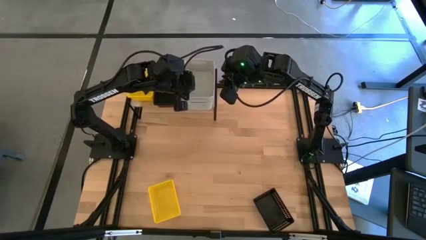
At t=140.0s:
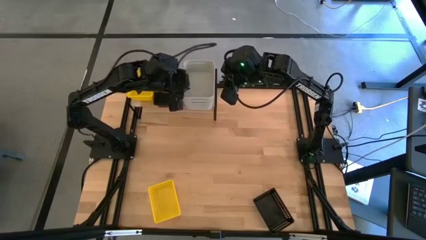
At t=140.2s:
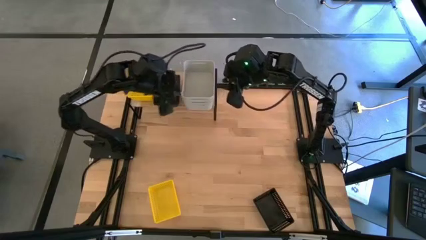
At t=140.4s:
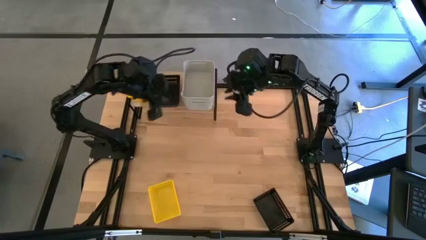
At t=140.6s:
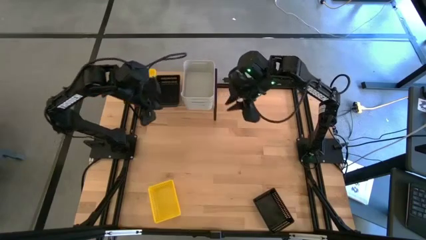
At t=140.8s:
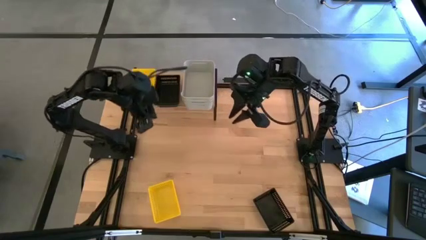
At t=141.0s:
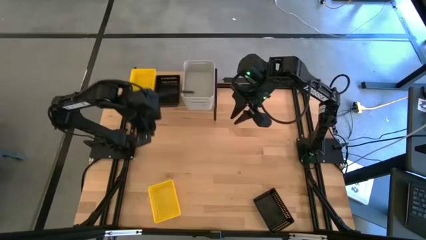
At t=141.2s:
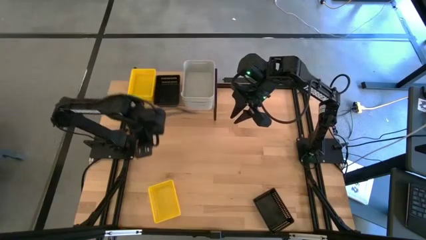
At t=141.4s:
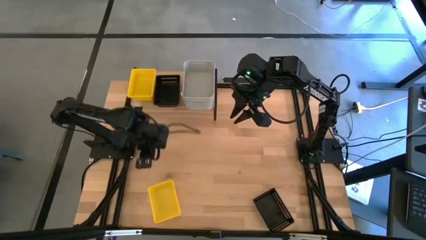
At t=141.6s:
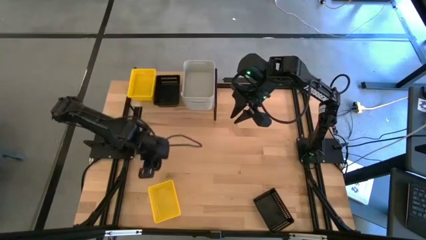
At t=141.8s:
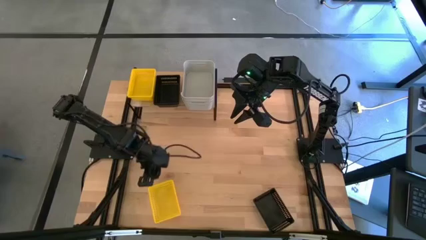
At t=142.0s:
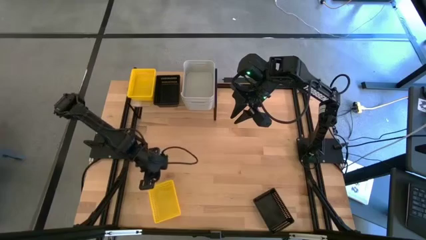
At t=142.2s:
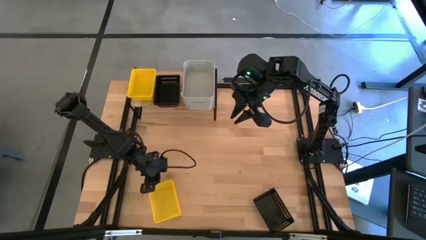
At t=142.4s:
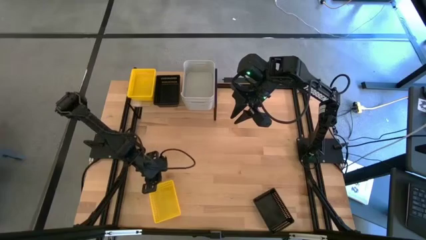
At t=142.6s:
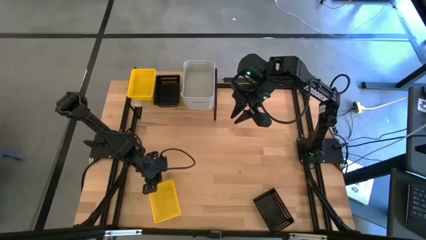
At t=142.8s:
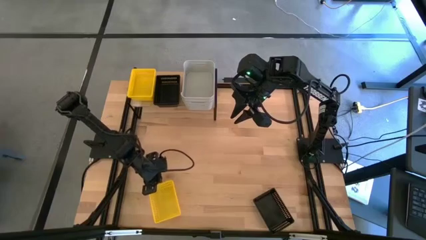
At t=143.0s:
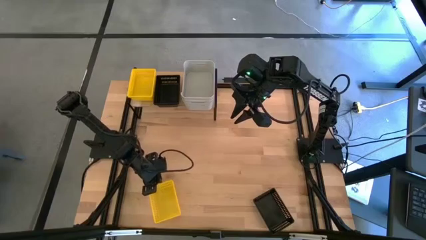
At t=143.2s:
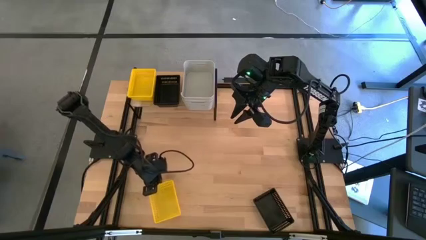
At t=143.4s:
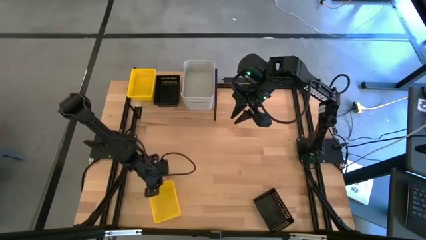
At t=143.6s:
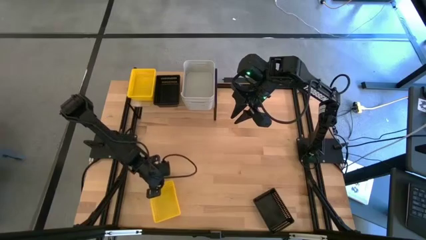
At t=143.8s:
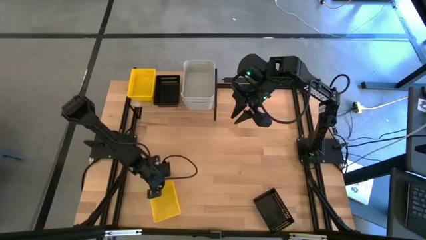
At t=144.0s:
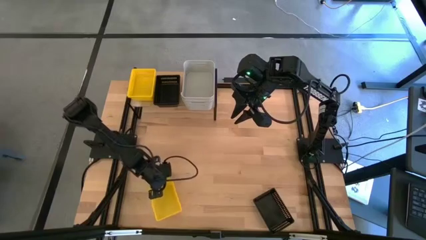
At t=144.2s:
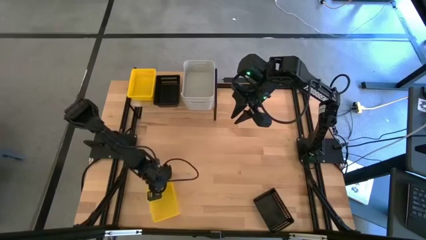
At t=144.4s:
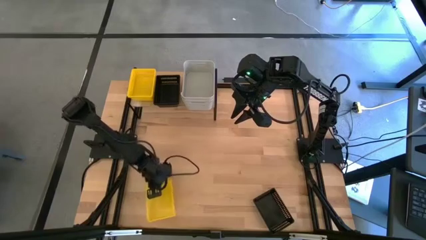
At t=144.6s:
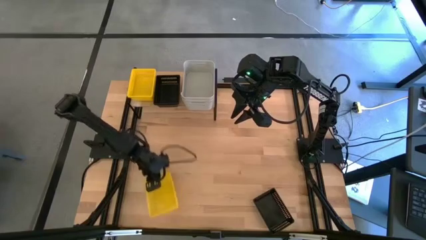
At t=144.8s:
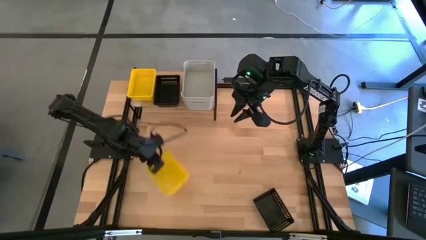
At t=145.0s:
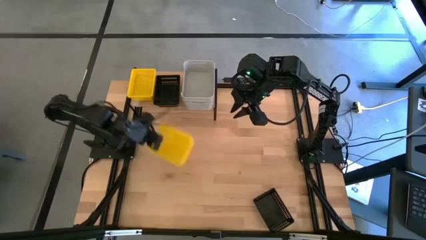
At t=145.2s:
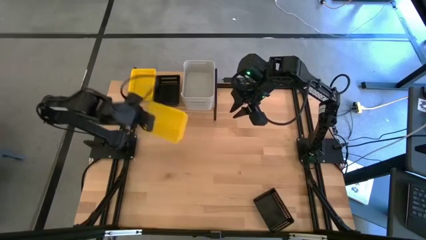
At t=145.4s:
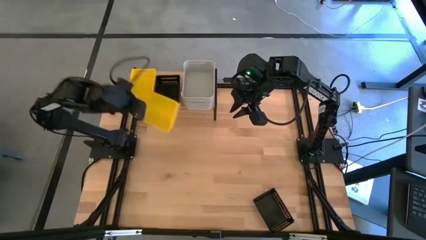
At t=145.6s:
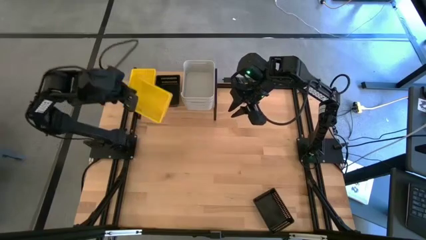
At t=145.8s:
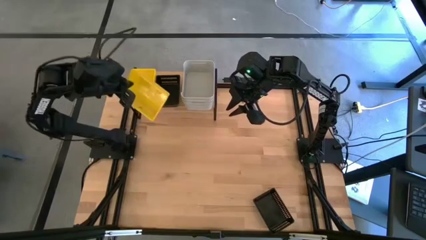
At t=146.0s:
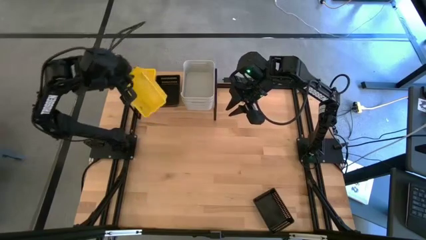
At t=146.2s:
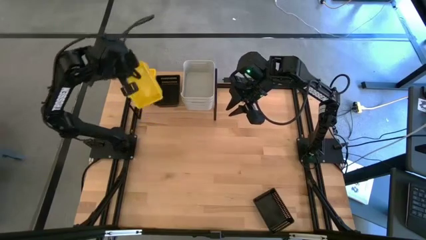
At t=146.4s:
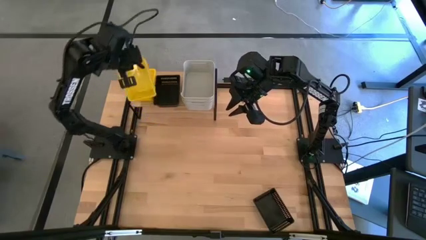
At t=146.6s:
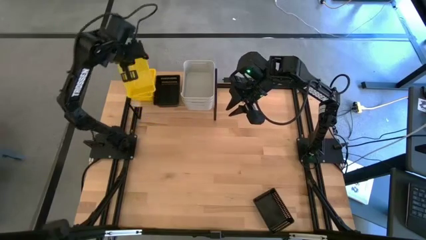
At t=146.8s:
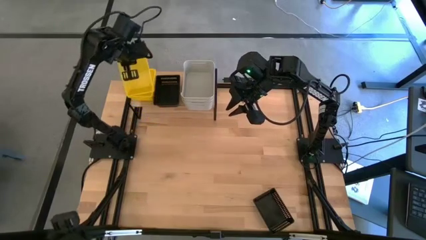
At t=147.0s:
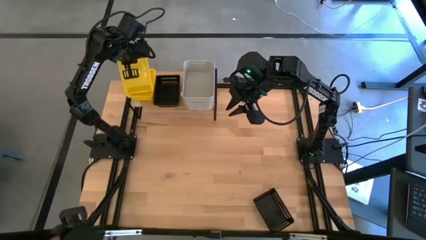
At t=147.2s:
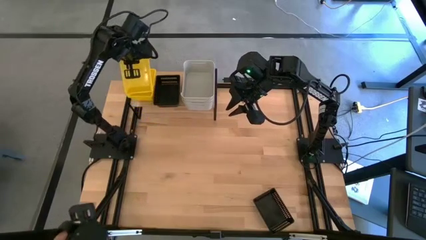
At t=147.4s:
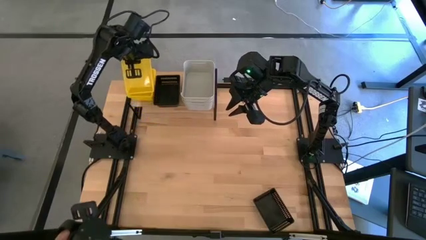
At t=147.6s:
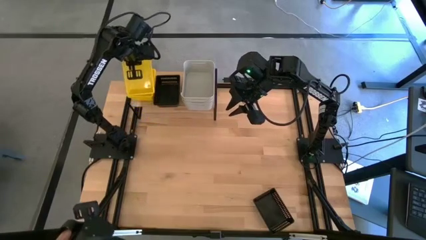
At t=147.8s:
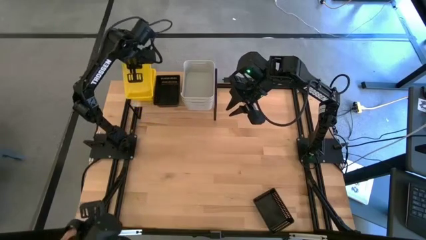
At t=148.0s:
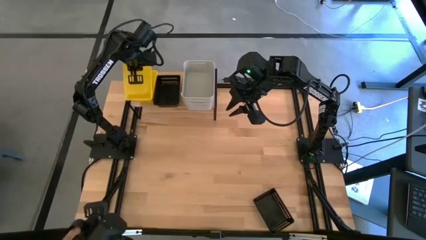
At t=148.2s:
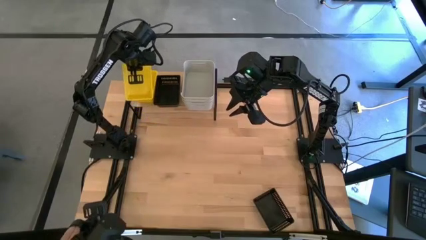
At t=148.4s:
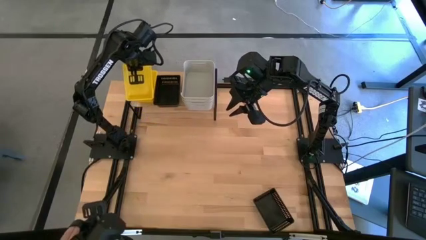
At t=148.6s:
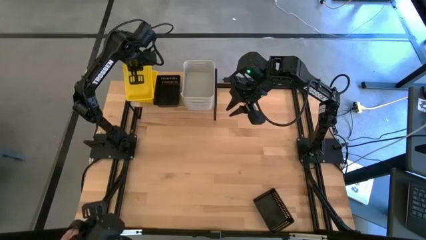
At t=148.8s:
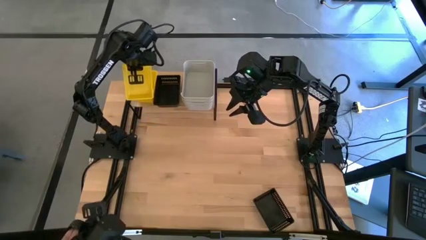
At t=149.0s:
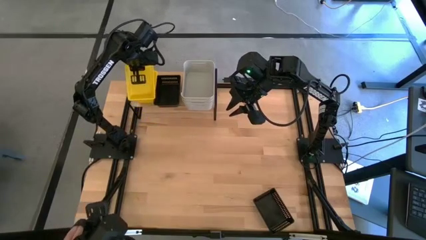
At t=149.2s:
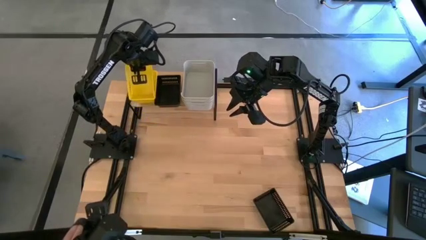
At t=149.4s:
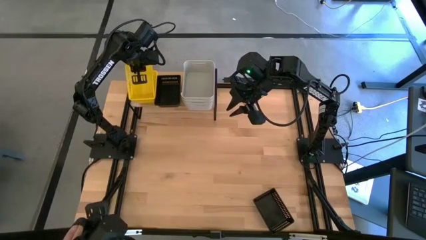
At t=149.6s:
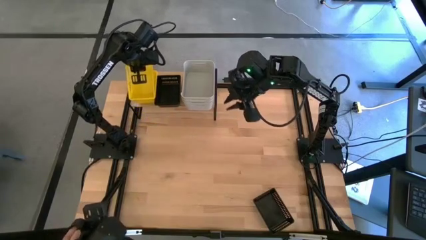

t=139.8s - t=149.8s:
Task: Stack baskets on shelf by color
Stack the yellow bin on top of the other yellow bin on the shelf
